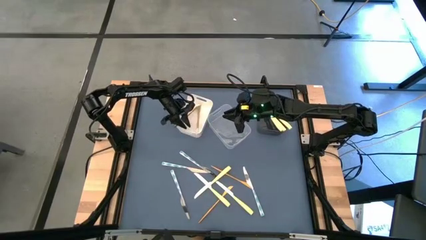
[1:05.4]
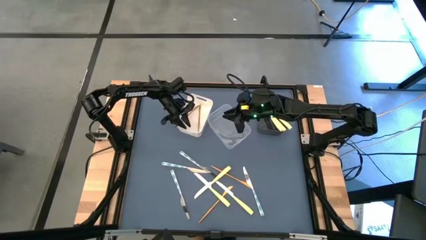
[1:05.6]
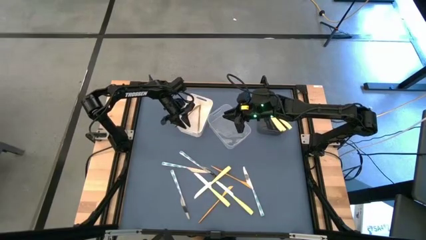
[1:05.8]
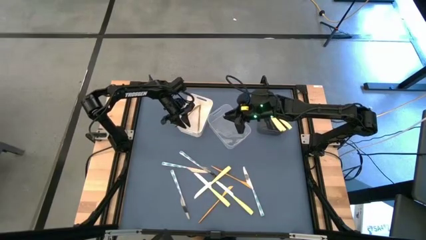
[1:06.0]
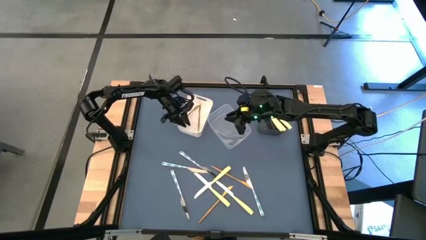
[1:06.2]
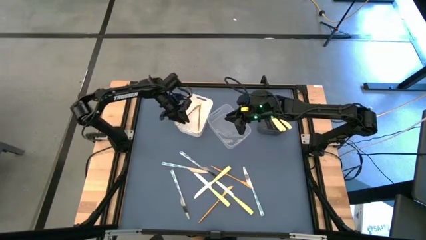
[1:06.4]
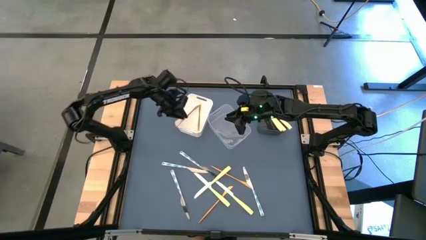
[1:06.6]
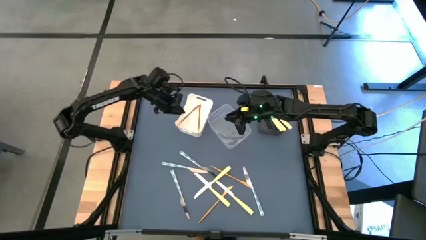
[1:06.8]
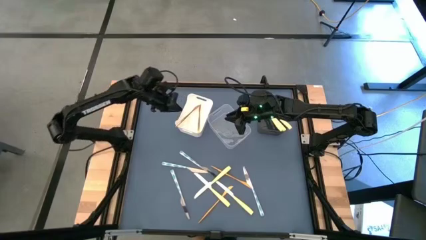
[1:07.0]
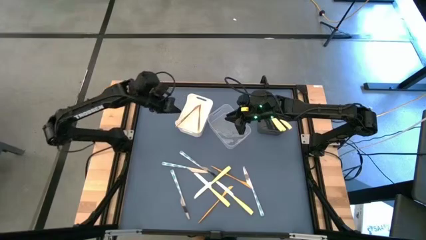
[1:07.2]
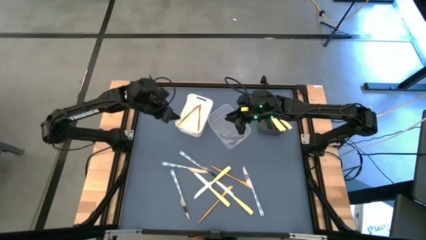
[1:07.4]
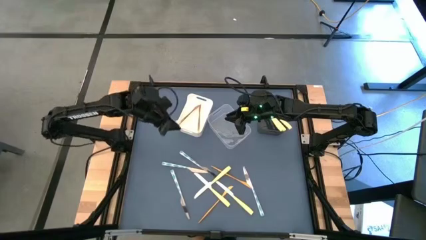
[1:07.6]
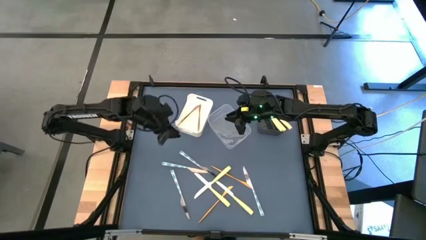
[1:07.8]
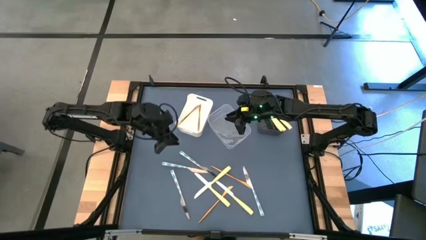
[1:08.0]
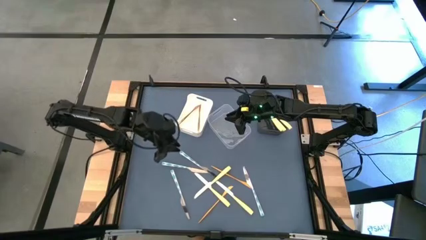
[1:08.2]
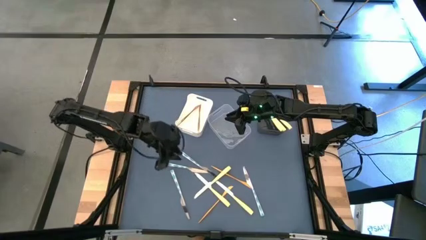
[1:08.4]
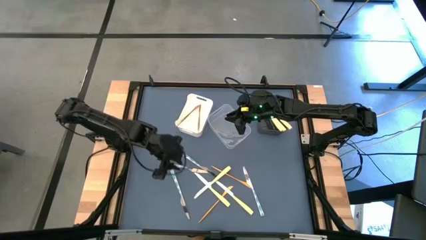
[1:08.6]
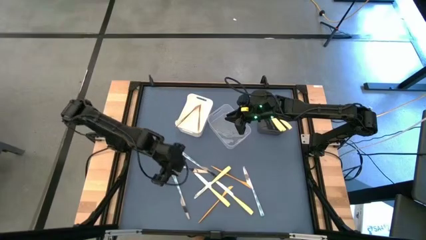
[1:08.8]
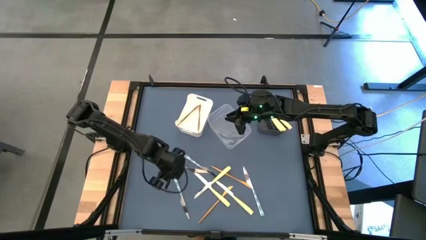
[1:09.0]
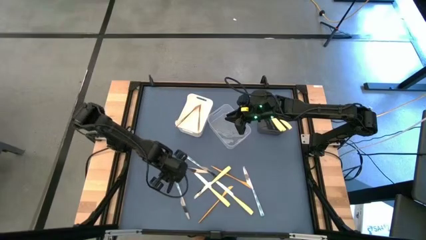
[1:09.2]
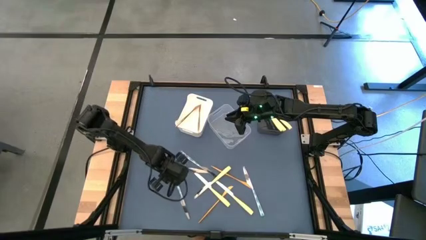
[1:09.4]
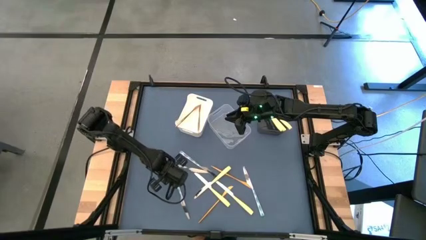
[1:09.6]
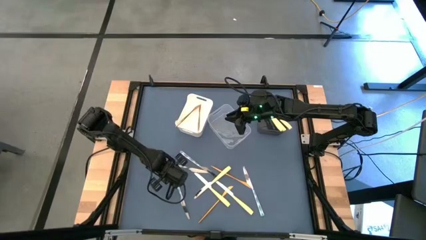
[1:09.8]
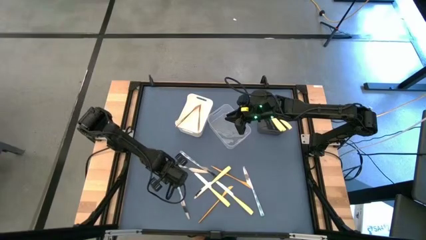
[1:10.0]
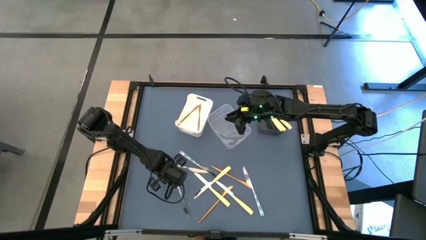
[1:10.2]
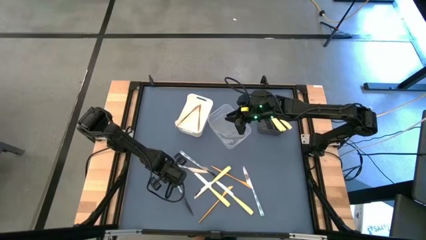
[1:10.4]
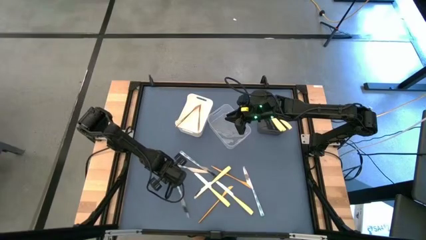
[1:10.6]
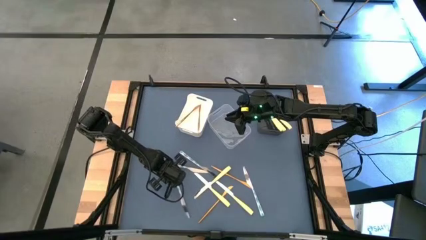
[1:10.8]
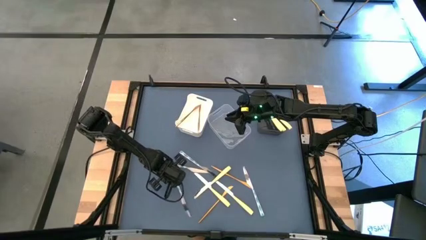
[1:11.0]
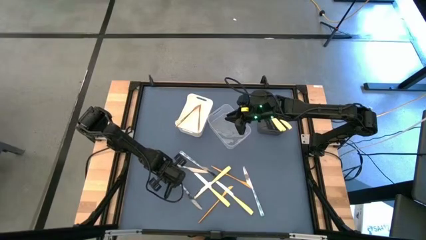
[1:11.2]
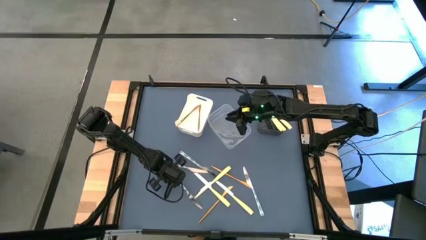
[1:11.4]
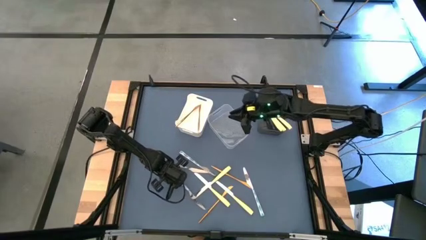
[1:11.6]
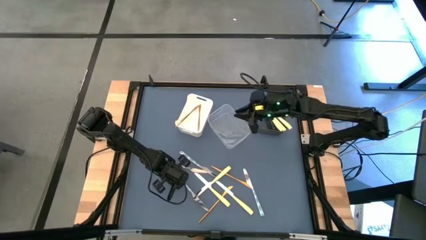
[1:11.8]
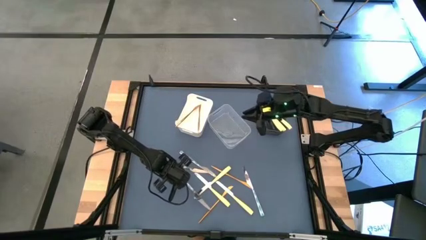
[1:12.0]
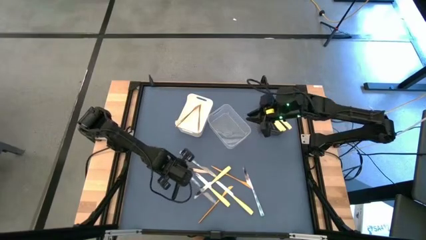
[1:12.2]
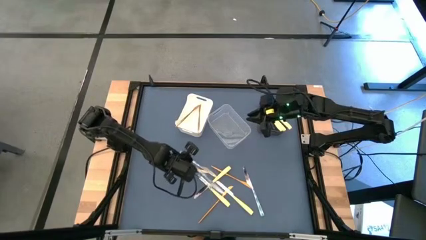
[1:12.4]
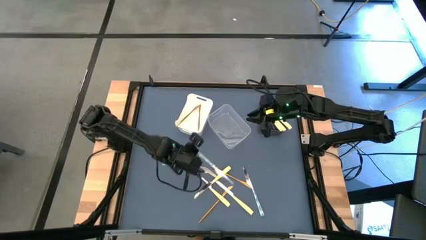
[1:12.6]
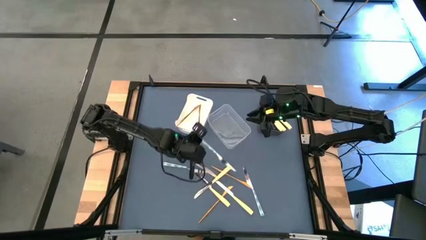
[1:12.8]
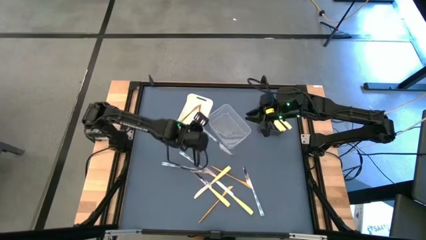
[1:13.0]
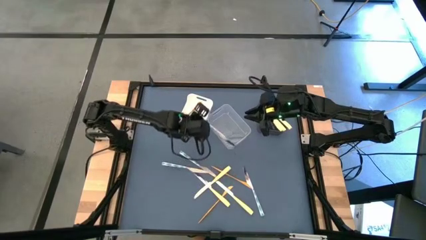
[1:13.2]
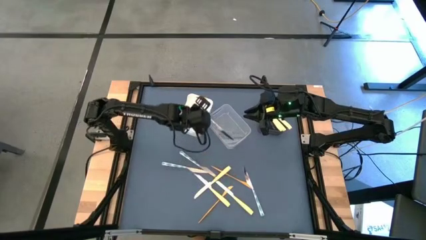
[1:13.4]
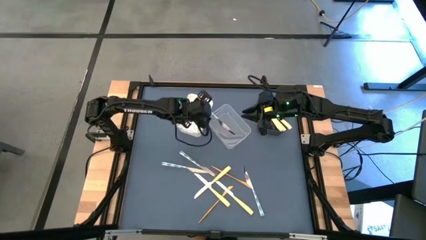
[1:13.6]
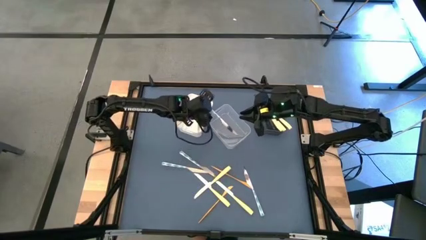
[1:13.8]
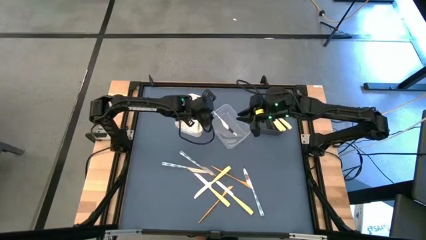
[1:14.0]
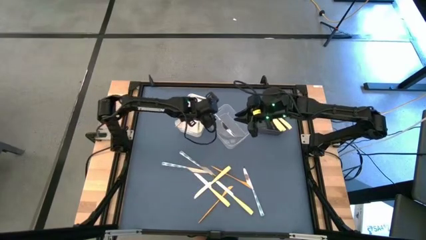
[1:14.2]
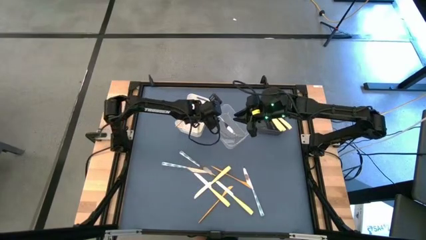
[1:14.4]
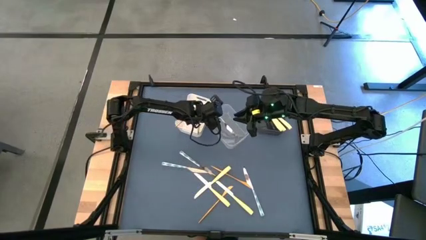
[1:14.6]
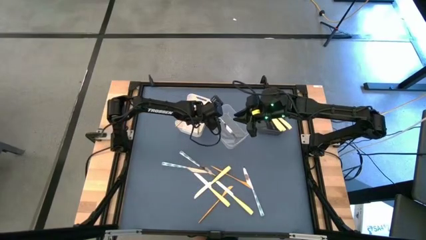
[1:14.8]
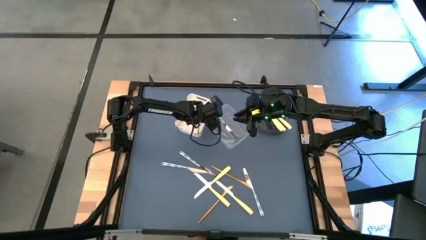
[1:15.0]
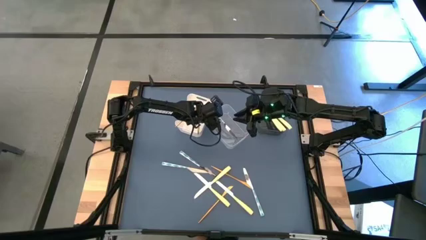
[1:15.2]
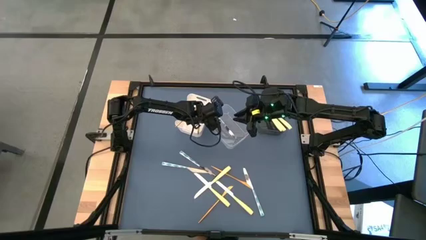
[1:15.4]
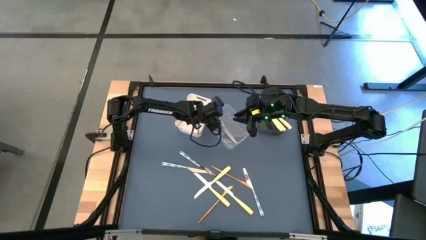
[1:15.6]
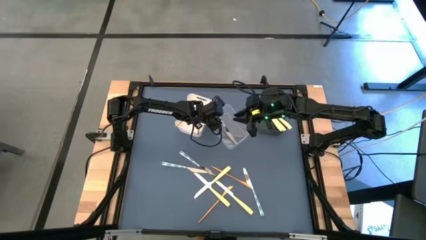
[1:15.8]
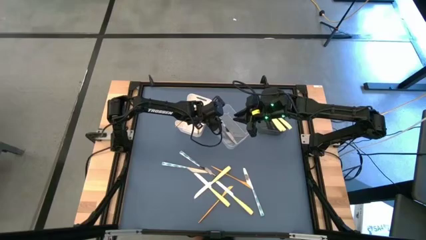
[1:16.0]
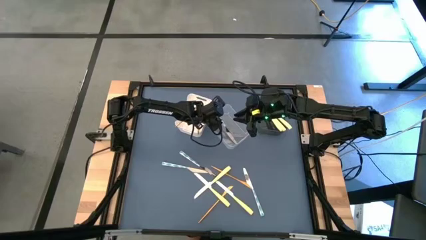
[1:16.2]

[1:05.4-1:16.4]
Task: Sort silverware by color (type)
Put the green knife into the transparent bin
